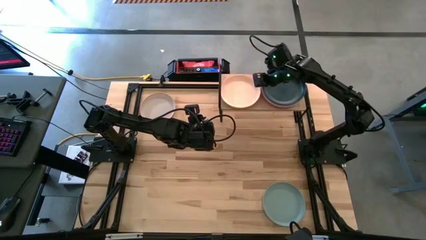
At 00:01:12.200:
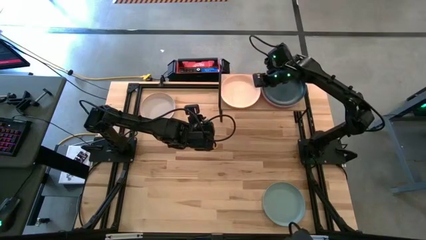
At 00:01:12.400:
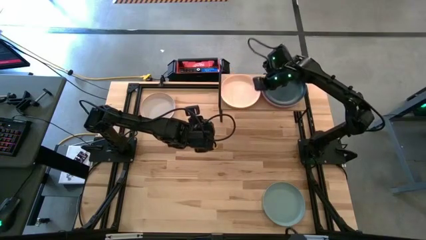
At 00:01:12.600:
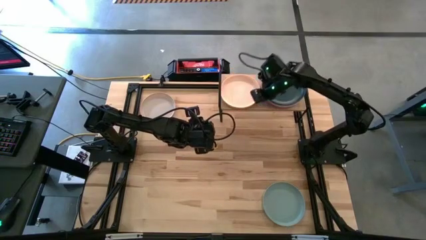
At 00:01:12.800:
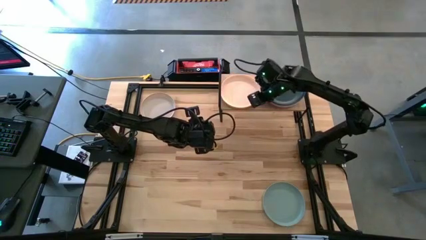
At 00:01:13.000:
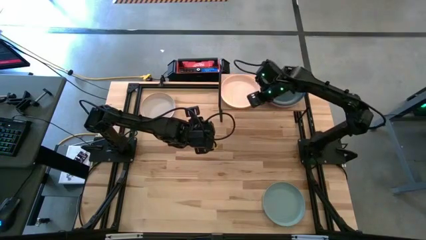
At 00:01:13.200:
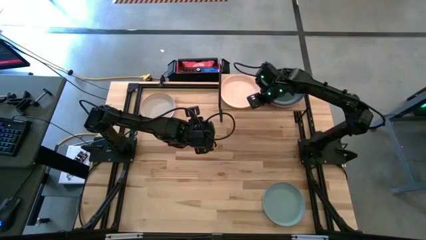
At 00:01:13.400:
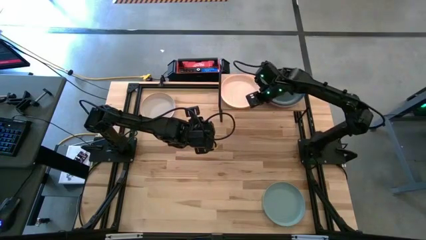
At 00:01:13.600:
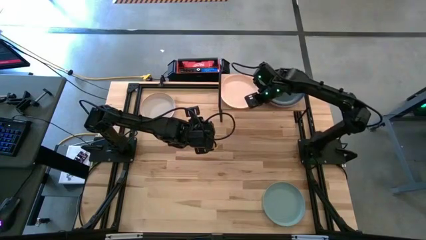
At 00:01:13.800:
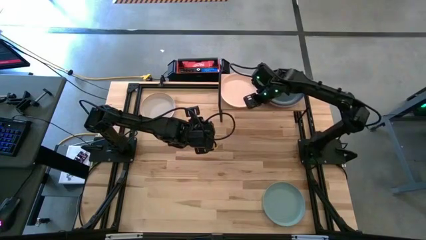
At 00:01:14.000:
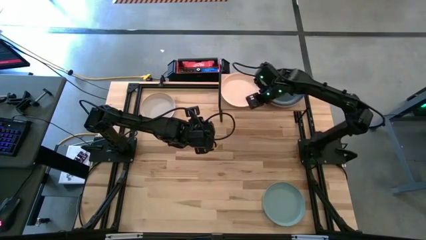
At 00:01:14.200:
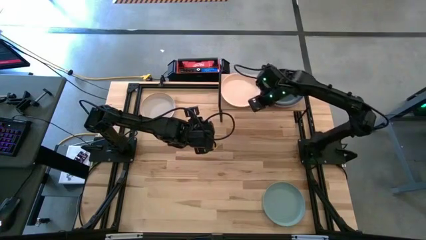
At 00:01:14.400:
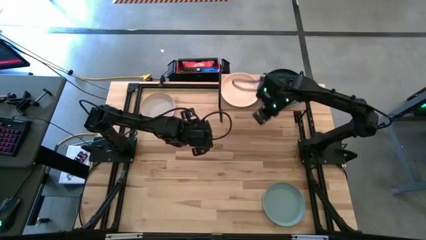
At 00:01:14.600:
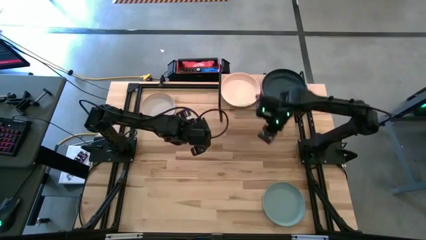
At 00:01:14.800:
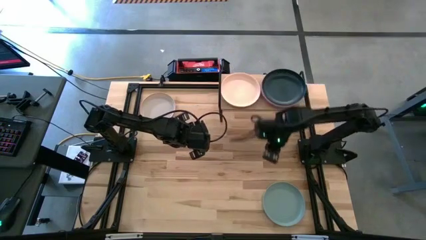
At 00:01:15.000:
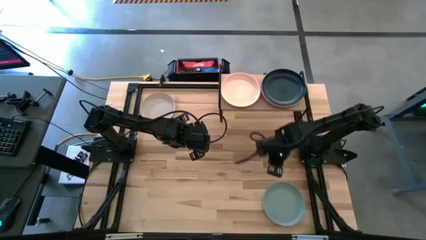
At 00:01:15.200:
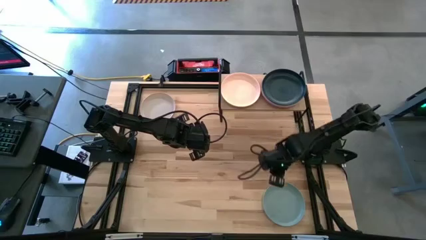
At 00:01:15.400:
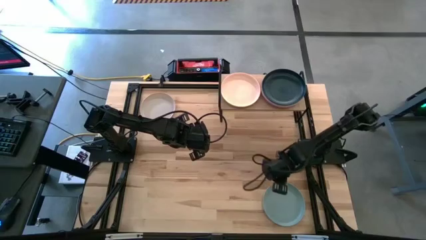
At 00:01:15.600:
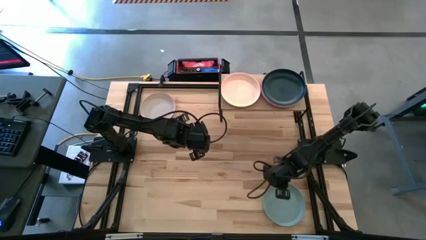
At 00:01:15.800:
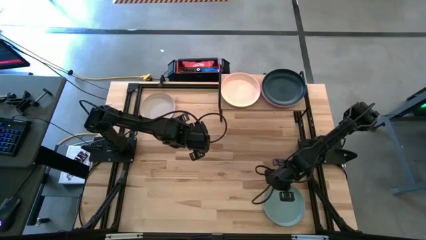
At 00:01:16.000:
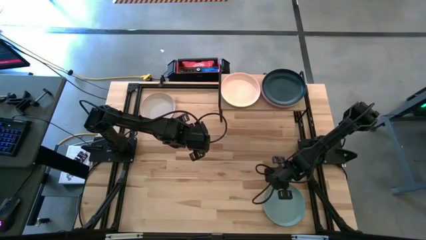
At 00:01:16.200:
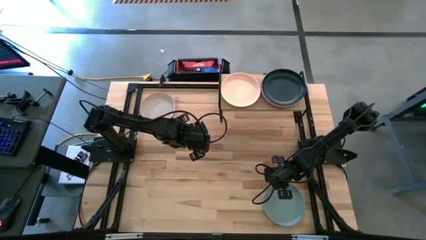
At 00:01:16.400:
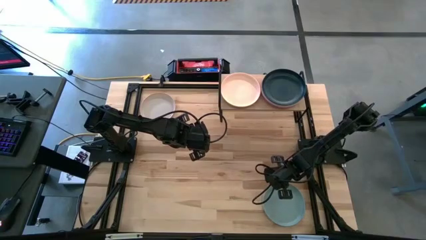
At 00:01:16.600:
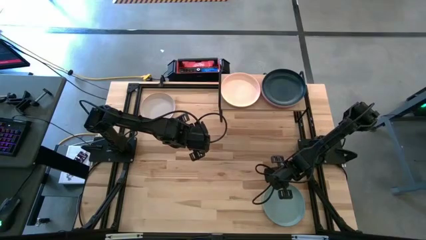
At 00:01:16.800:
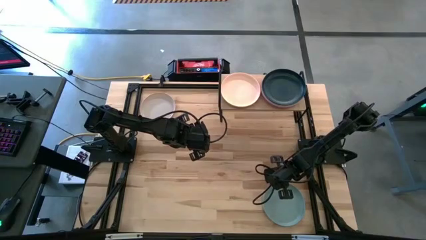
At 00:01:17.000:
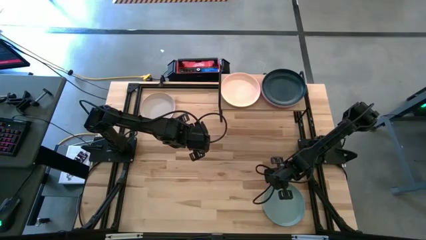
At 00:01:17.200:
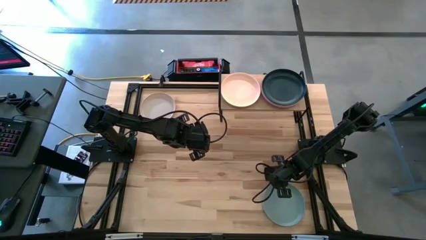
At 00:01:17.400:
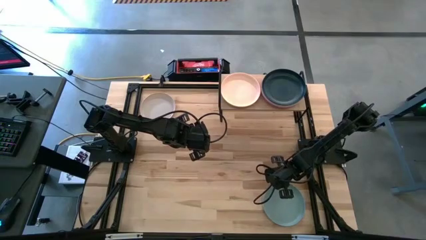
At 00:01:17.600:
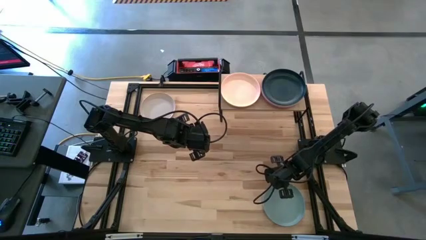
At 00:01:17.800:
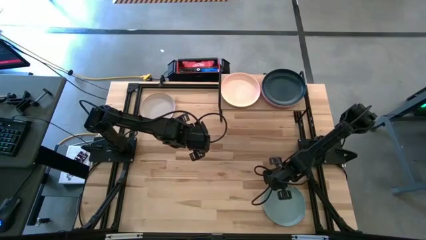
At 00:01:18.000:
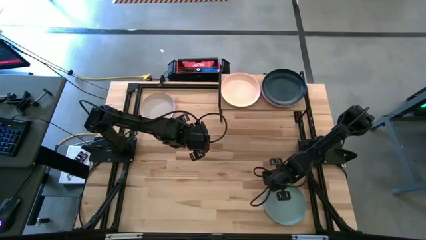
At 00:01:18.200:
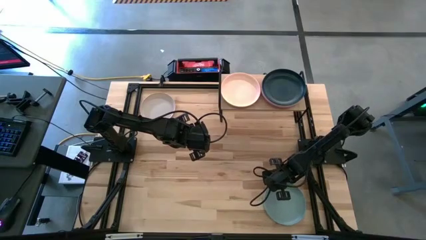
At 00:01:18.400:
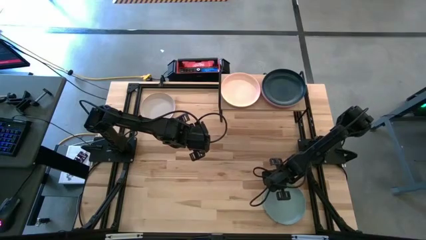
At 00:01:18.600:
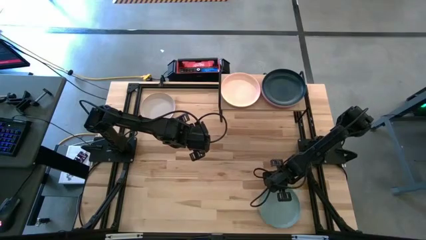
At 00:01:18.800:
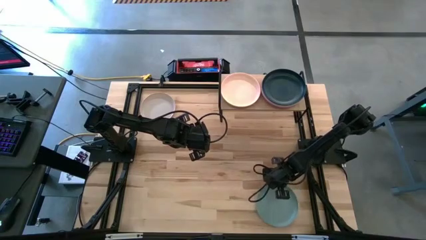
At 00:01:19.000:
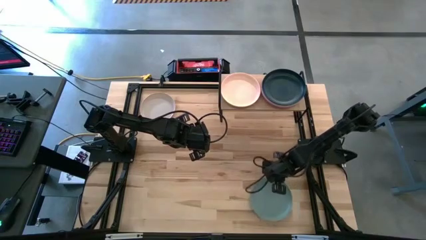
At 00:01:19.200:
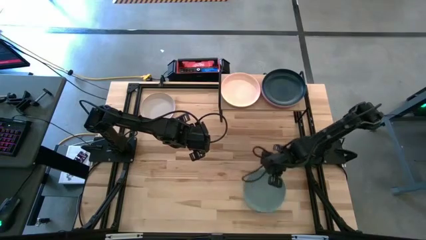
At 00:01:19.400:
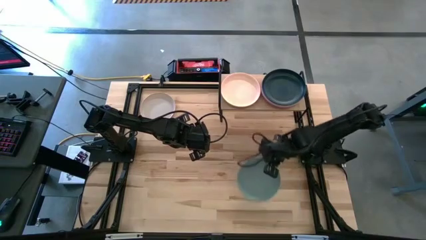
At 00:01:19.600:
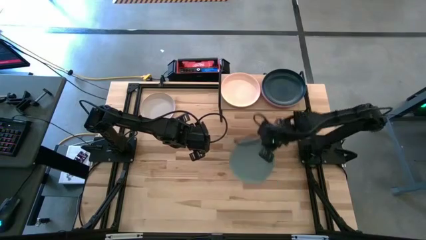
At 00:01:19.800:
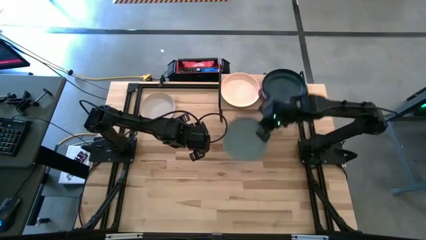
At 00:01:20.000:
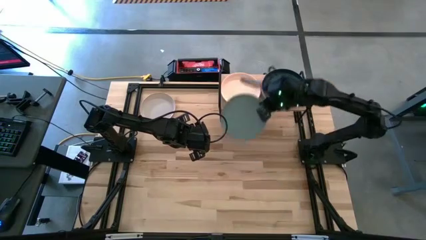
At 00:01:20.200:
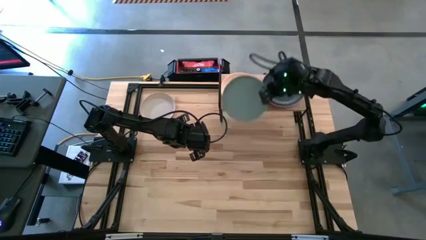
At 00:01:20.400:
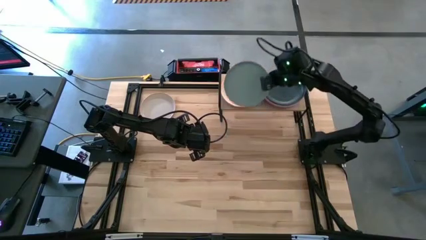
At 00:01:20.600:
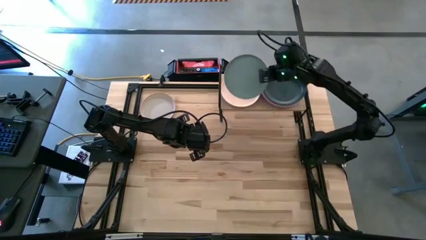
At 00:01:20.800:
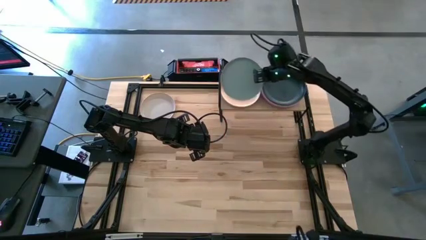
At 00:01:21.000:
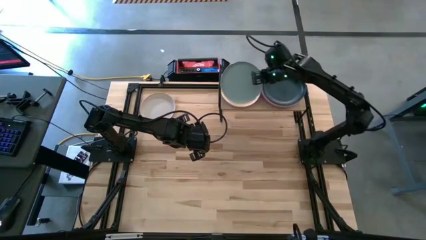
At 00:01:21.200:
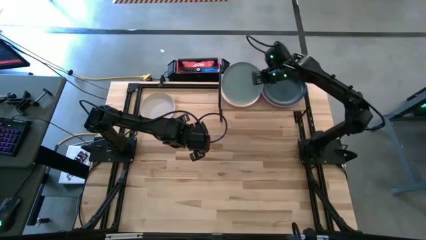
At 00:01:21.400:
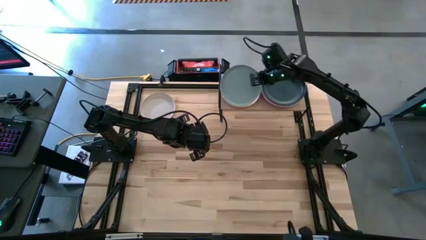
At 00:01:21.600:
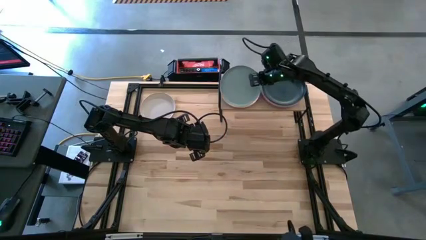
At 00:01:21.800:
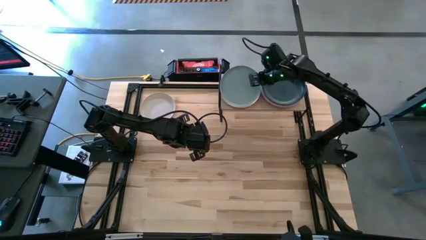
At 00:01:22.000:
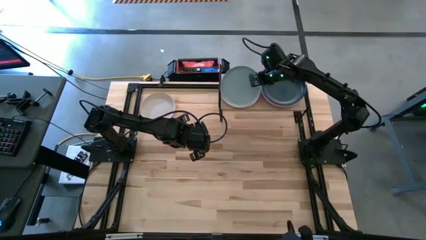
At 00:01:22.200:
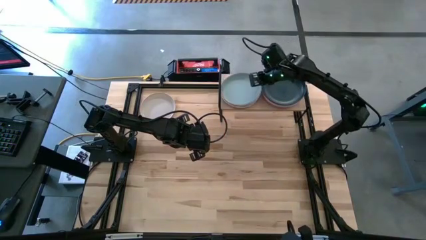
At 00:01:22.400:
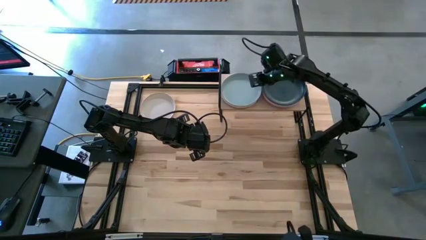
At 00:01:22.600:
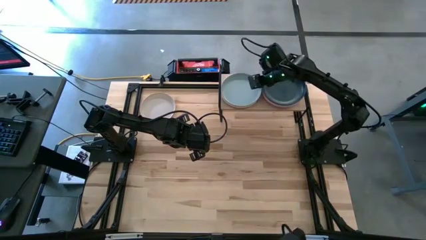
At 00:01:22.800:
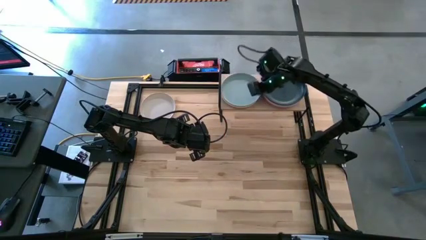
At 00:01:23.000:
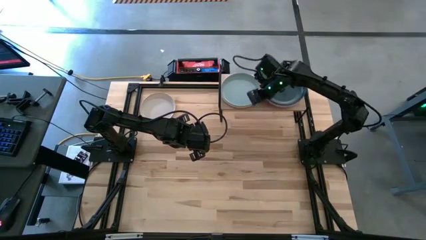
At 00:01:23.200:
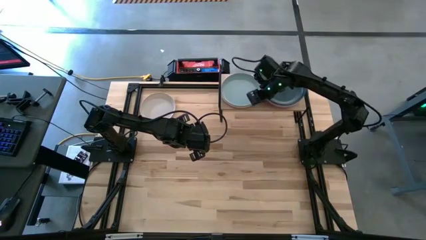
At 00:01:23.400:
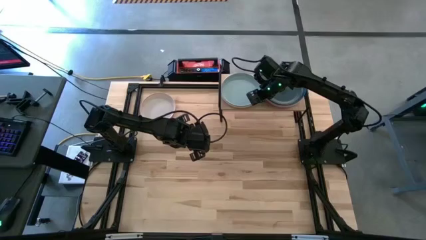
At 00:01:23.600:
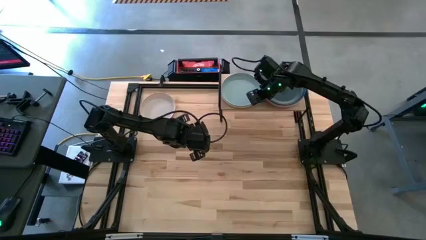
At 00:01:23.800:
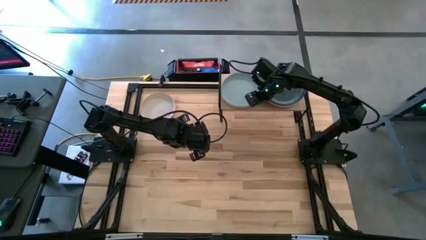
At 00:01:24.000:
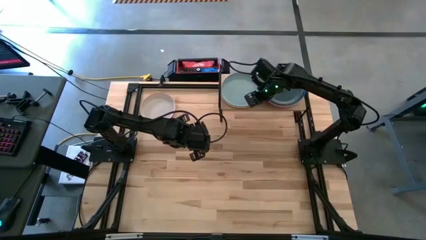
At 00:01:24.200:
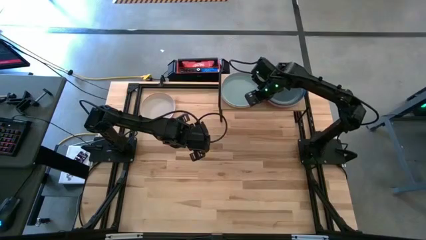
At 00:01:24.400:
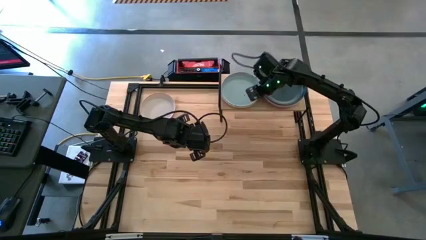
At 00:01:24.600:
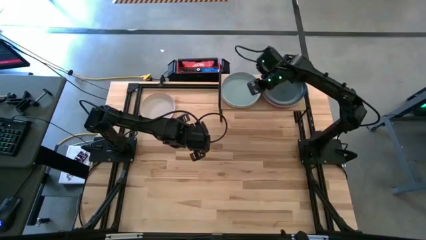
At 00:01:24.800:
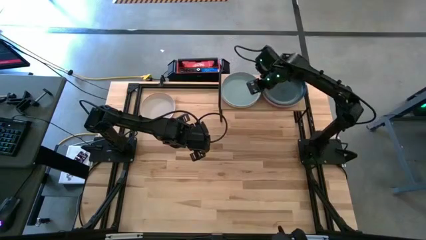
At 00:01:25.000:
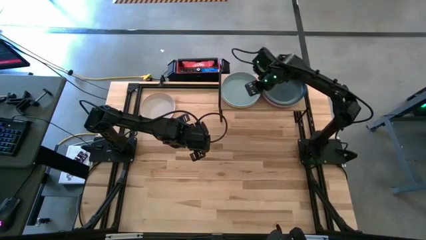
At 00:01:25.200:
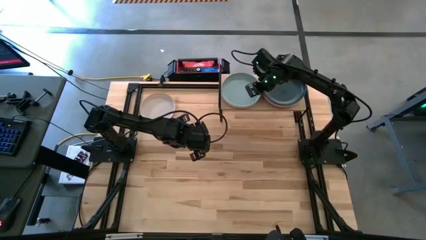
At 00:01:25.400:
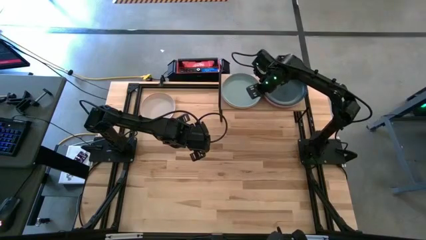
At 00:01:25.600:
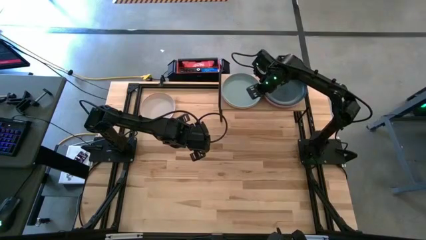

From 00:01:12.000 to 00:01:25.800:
Task: Place and stack plates onto a shelf
Stack the light blue plate on top of the light orange plate on the shelf

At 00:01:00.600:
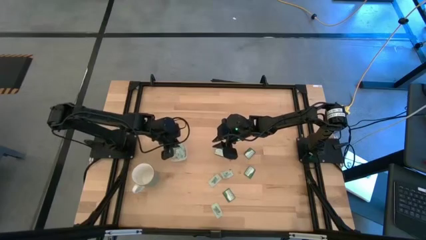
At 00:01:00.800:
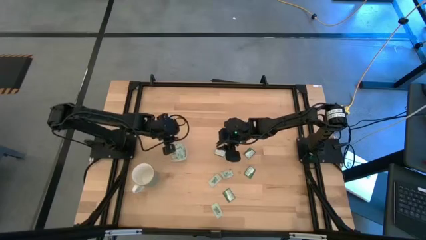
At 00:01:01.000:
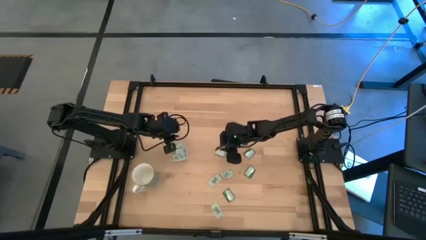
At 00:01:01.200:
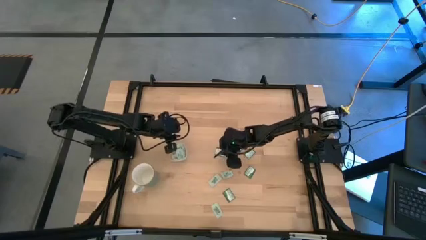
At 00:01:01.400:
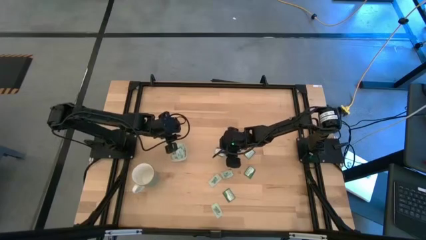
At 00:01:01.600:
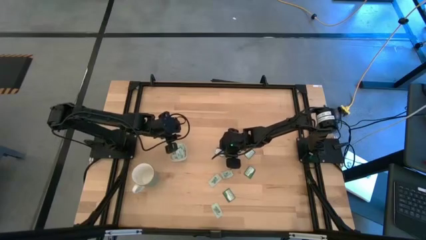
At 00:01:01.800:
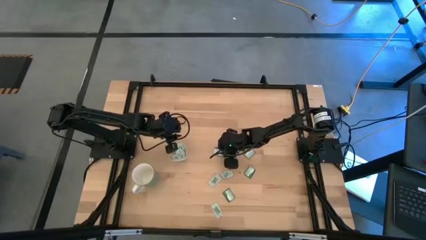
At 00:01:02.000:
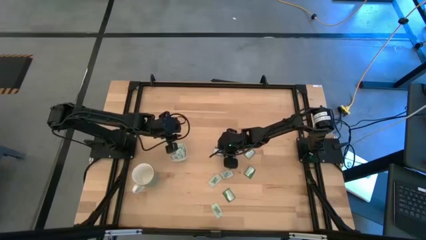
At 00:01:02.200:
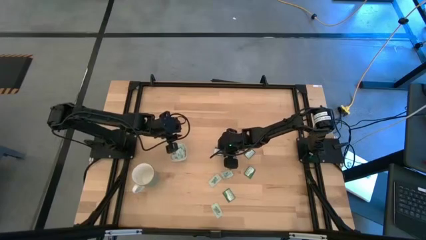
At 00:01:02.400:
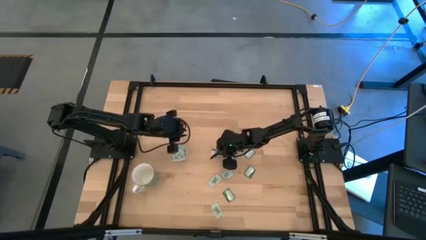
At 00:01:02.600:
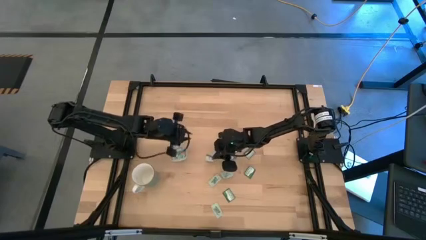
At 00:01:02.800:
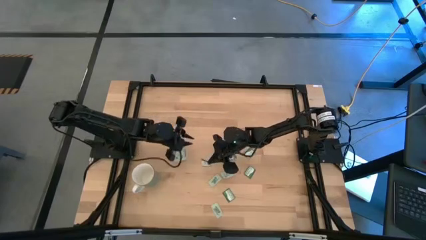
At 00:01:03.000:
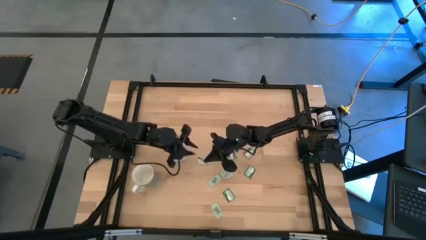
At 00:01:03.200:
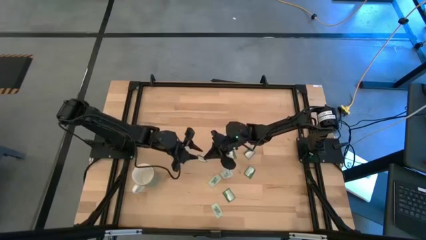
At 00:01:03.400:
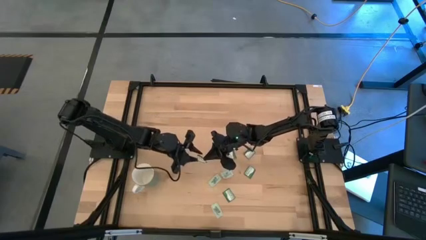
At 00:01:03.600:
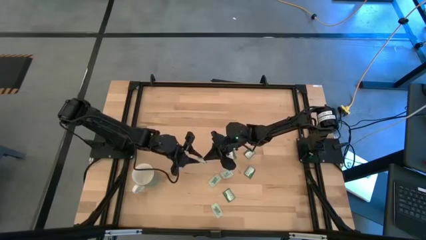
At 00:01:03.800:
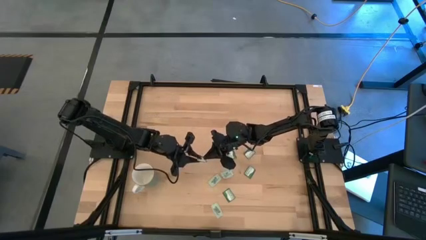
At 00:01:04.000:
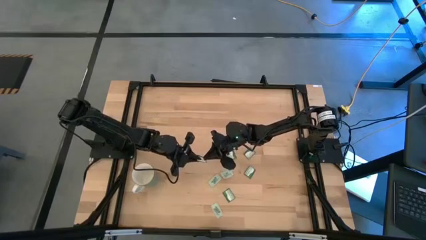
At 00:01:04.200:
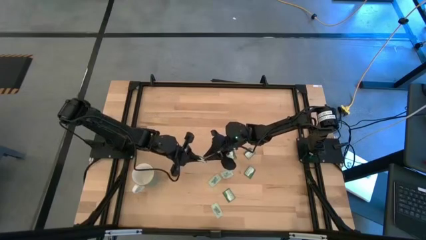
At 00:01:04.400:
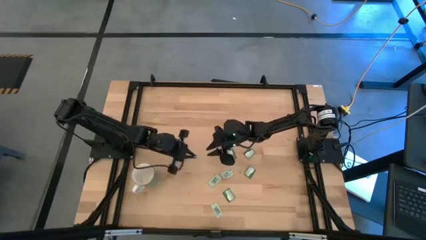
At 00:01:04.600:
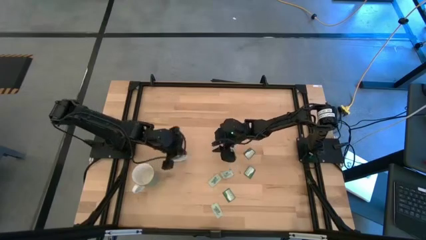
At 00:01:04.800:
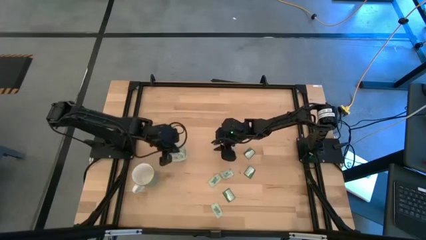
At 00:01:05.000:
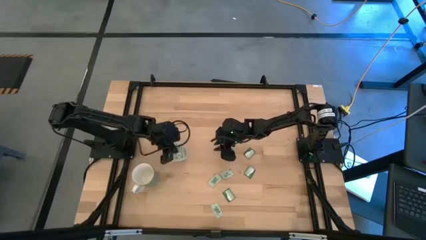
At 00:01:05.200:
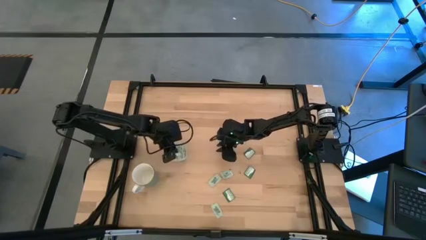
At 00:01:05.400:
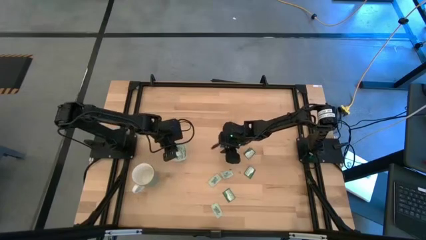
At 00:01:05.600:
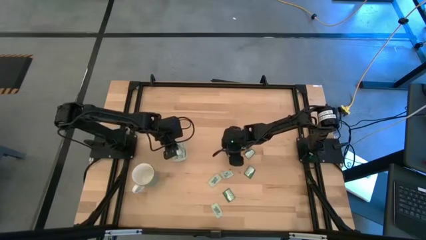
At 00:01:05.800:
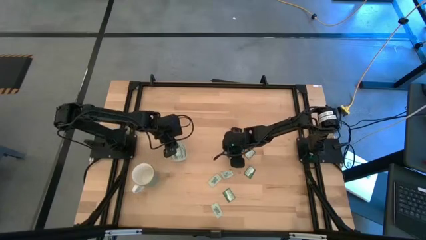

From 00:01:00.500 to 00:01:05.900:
Task: Pick and place Stevia / Truvia into bins
Put the dark green stevia packet into the transparent container
